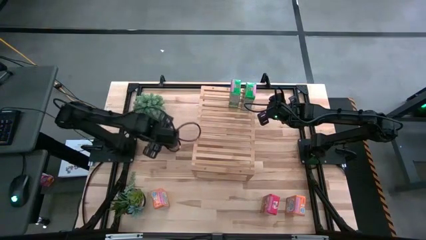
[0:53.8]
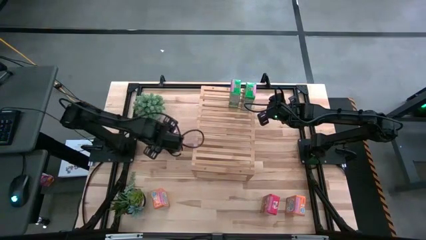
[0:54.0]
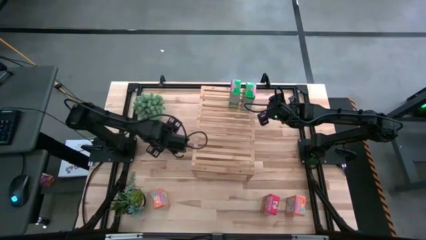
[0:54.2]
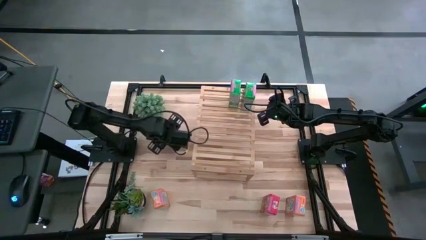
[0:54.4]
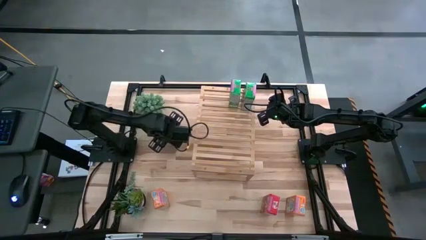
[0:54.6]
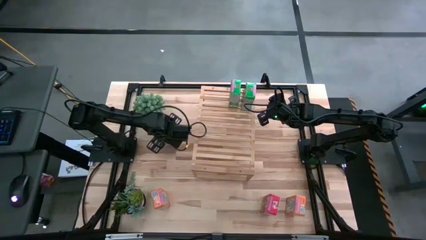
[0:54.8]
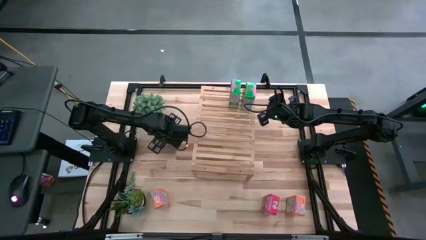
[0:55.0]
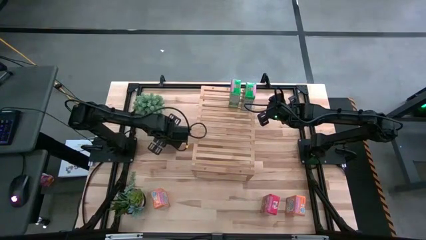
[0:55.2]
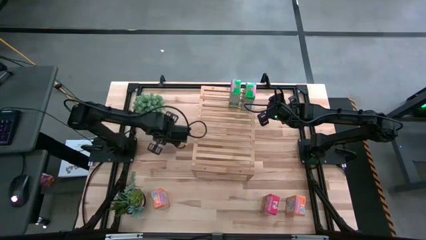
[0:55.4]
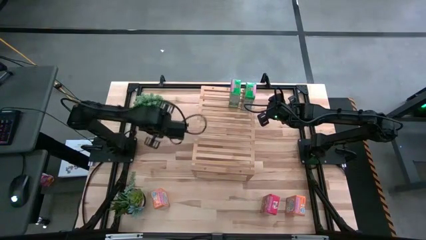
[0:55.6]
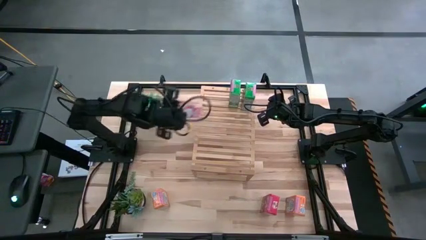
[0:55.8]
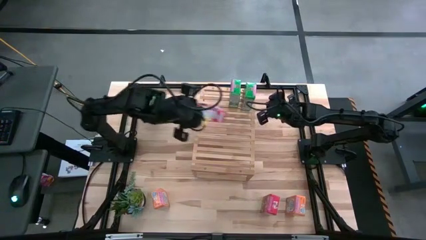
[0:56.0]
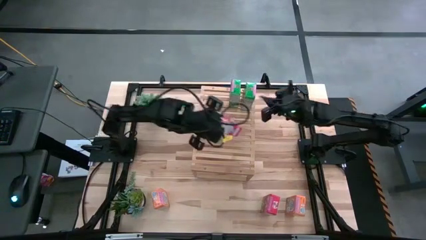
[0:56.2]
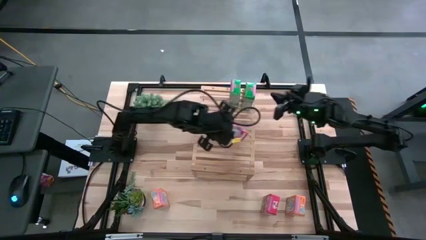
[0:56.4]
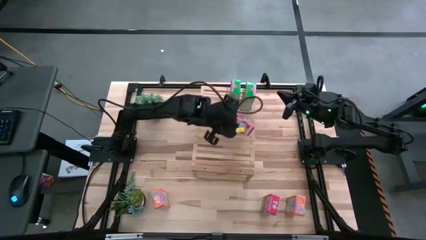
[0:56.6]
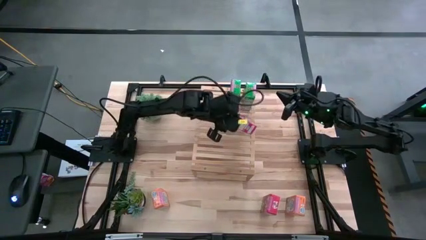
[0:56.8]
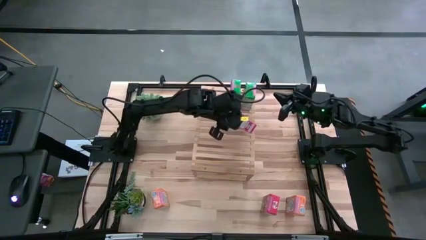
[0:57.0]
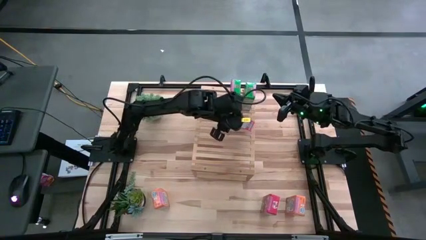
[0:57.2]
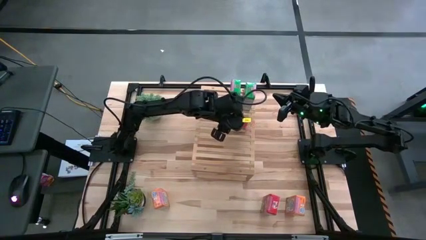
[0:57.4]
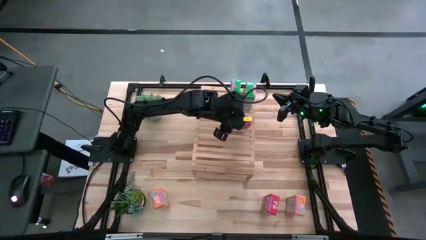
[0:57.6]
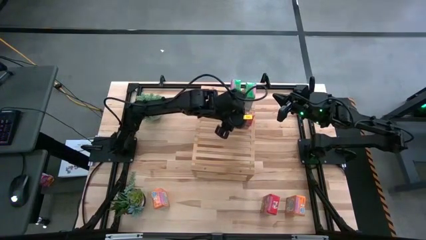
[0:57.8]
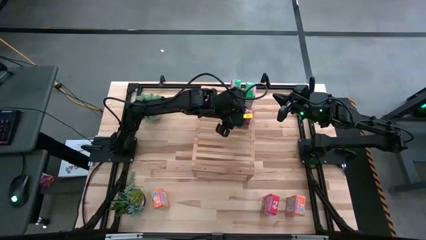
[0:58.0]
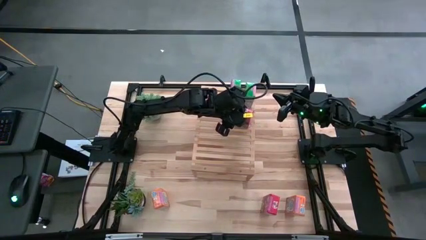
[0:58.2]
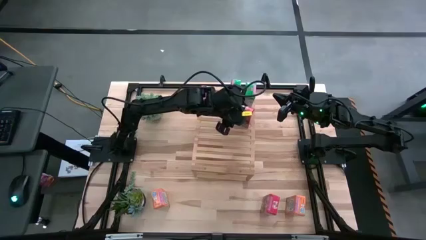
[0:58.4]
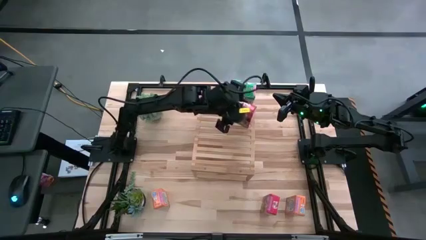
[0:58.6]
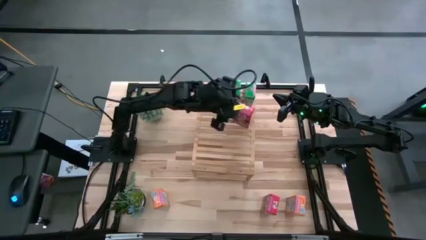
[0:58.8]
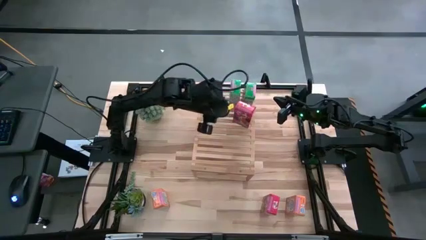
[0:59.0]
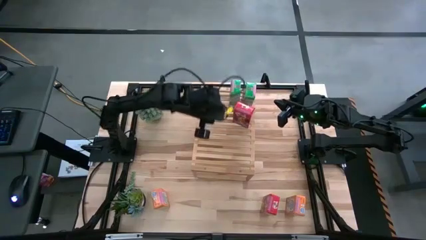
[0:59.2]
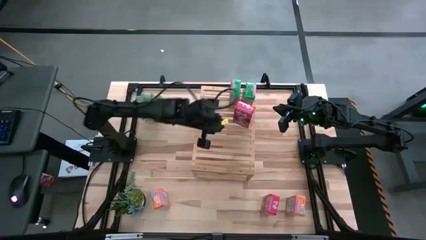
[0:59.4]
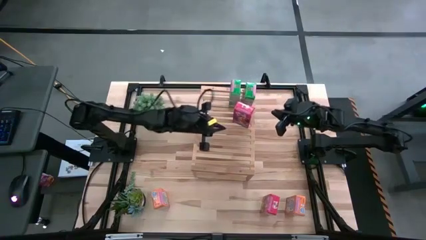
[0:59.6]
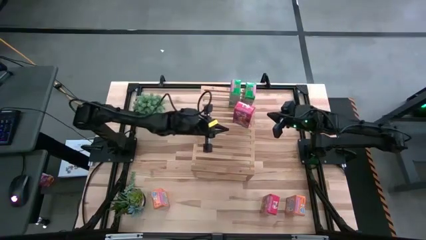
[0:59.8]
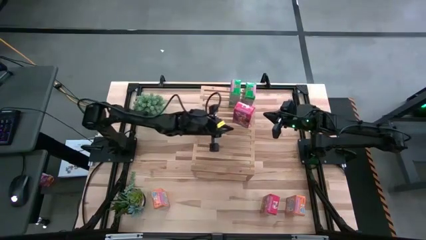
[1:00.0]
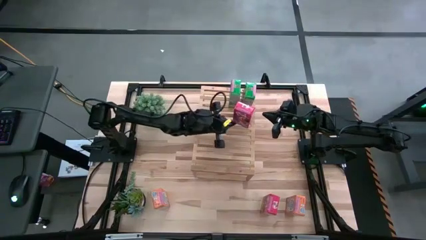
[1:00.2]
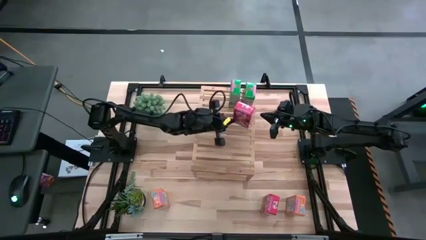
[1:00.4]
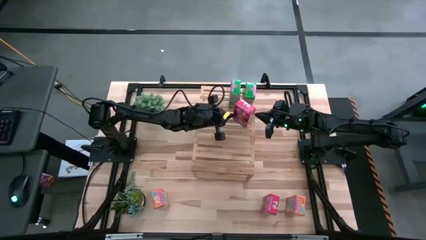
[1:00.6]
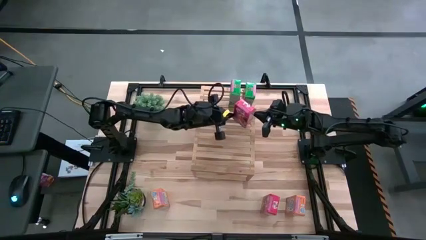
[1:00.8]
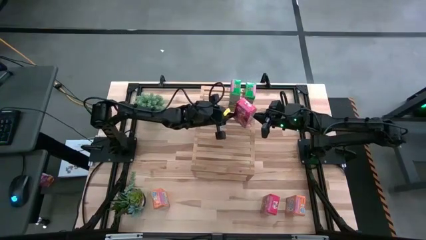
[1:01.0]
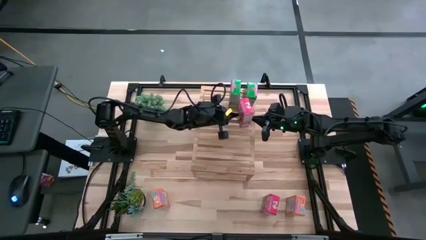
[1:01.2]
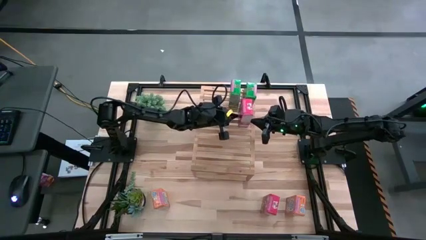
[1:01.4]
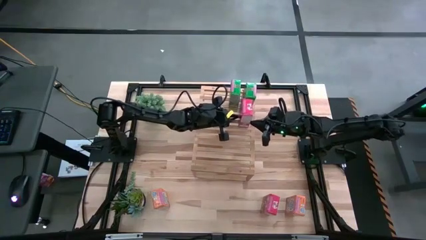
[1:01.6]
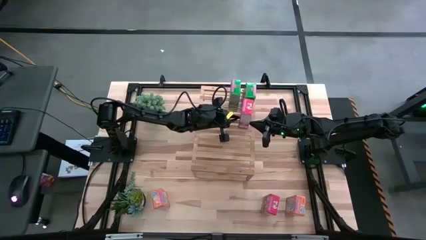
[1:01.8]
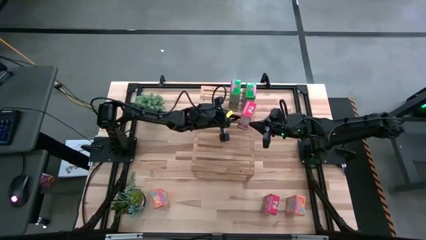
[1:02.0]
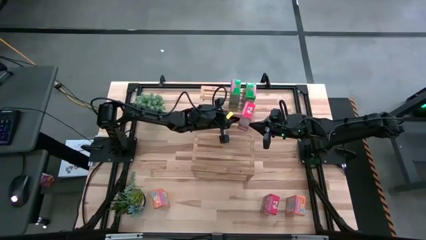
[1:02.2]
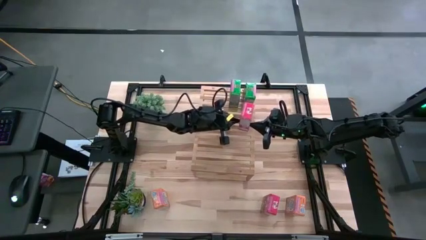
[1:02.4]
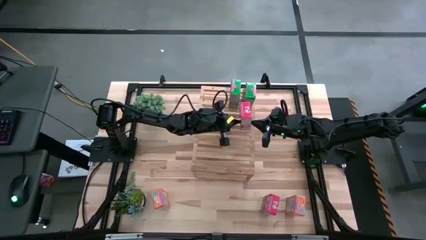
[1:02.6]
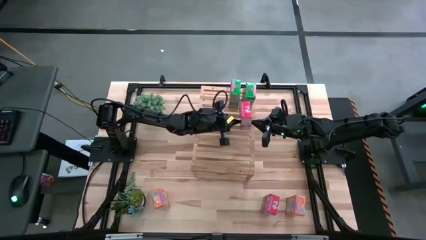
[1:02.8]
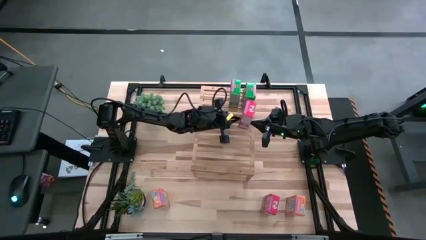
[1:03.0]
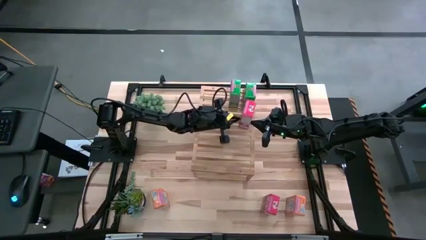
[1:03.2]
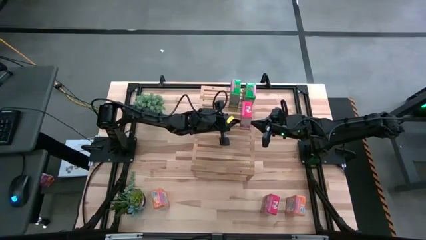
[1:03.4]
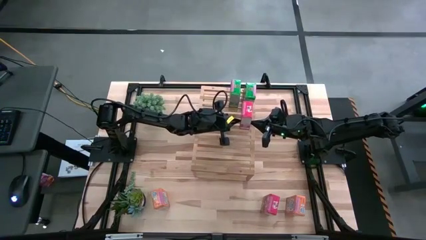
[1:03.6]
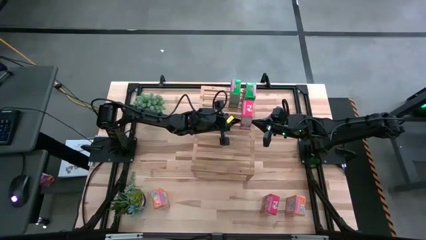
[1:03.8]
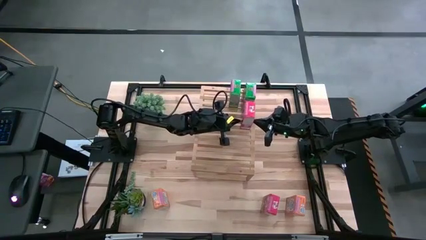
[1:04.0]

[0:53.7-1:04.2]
Task: Stack cereal on shelf
Put the left red box cereal on the shelf

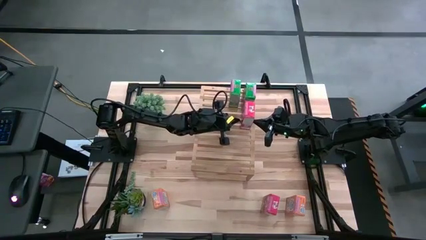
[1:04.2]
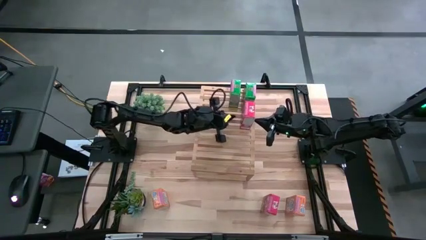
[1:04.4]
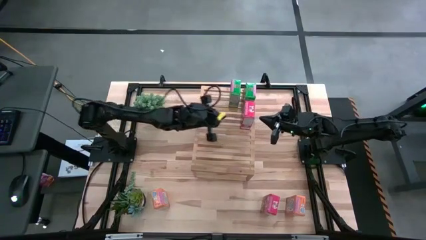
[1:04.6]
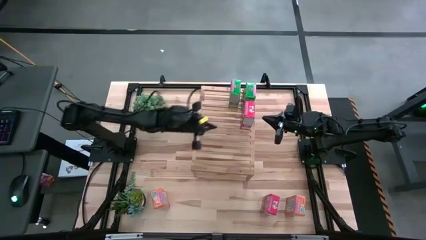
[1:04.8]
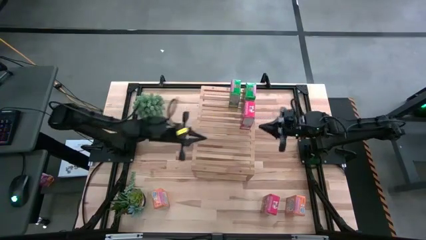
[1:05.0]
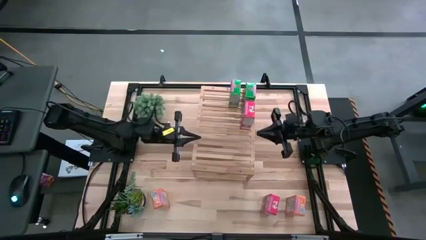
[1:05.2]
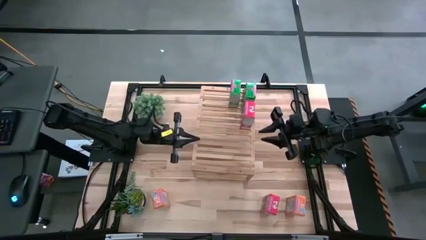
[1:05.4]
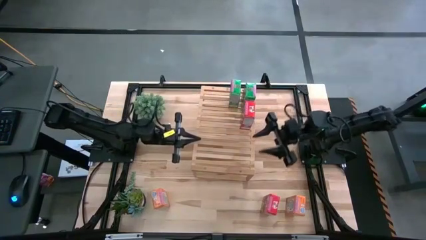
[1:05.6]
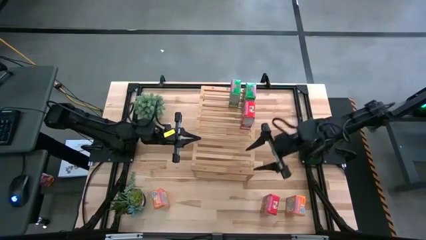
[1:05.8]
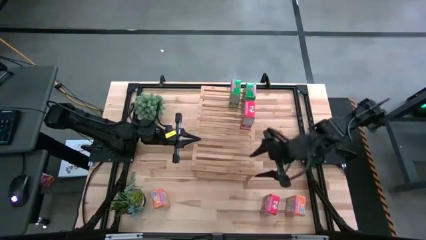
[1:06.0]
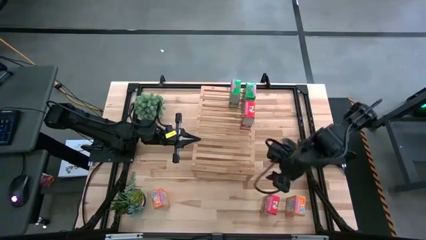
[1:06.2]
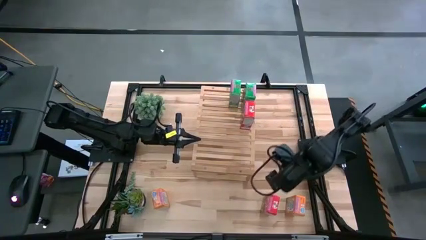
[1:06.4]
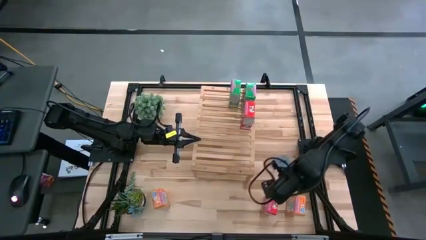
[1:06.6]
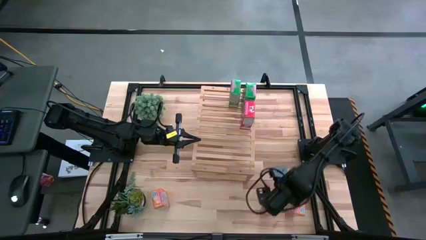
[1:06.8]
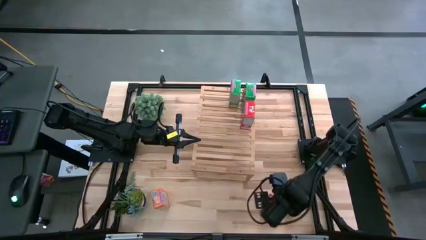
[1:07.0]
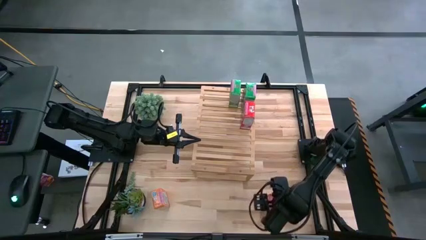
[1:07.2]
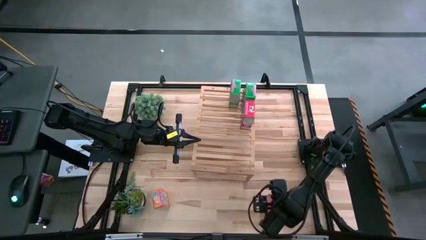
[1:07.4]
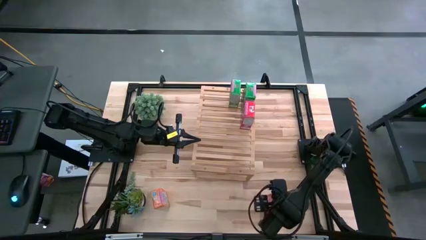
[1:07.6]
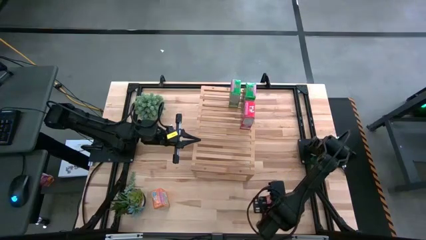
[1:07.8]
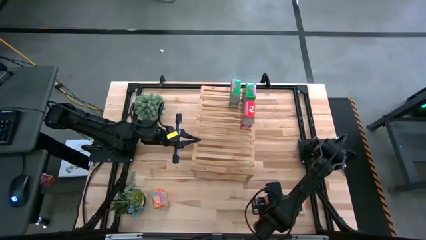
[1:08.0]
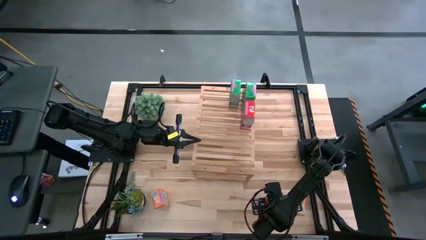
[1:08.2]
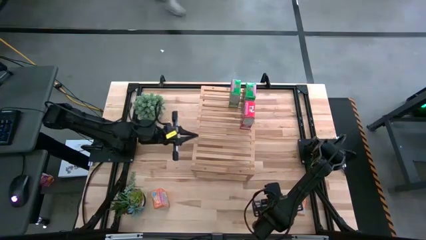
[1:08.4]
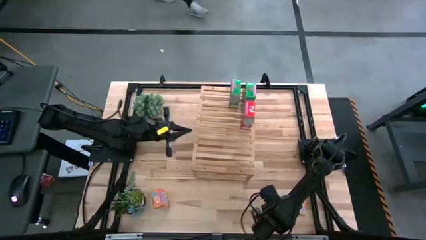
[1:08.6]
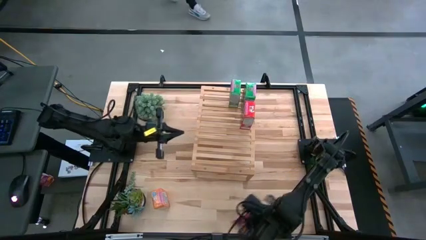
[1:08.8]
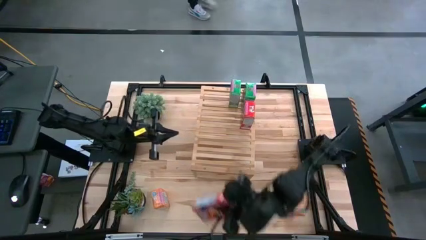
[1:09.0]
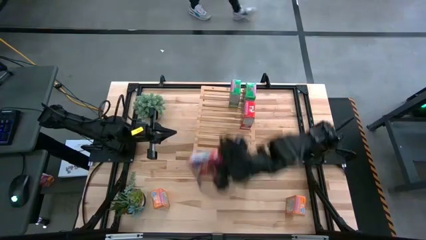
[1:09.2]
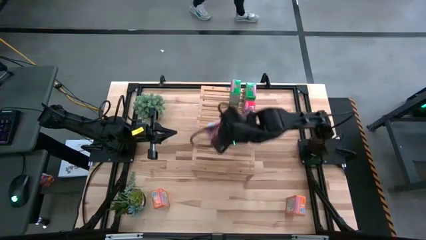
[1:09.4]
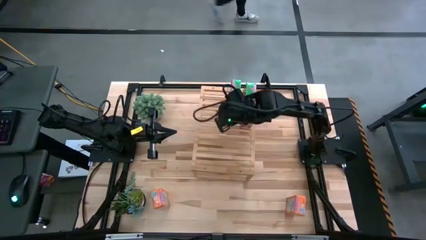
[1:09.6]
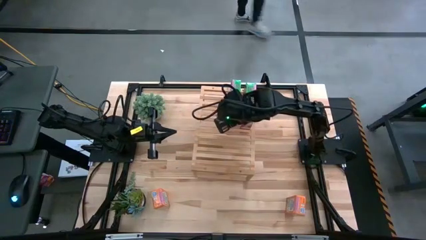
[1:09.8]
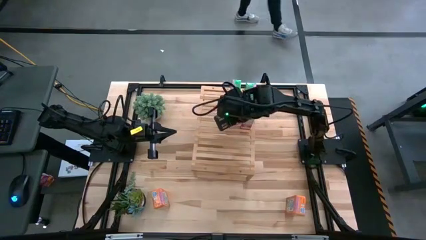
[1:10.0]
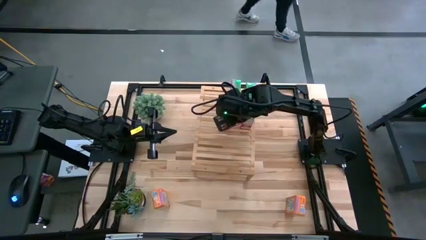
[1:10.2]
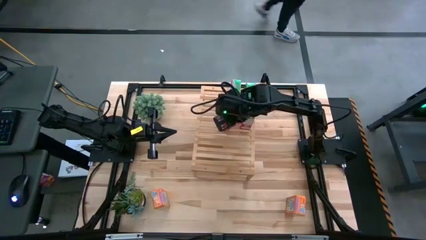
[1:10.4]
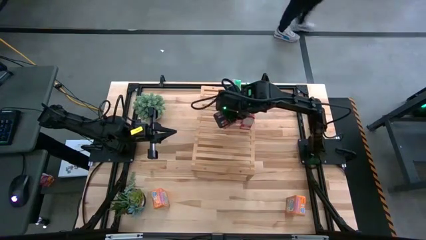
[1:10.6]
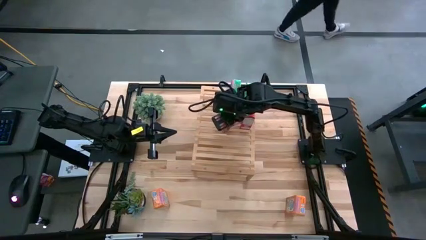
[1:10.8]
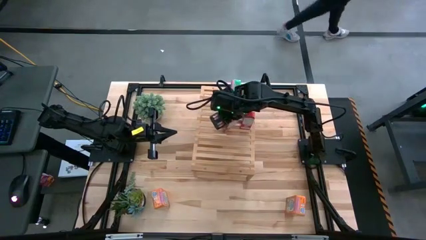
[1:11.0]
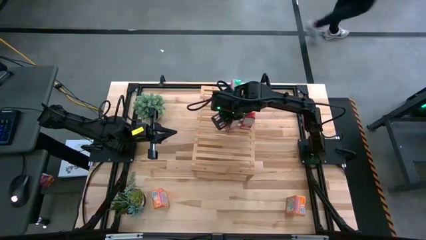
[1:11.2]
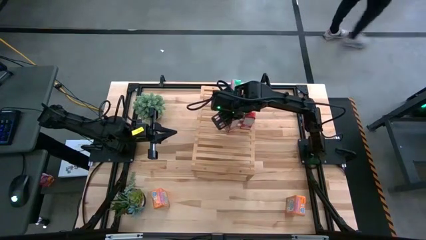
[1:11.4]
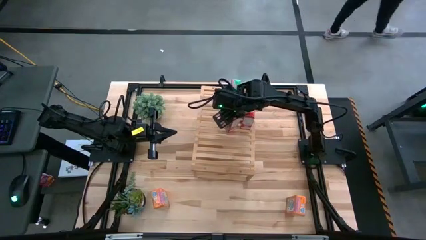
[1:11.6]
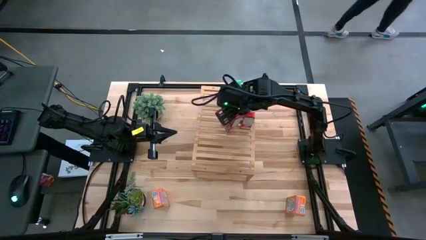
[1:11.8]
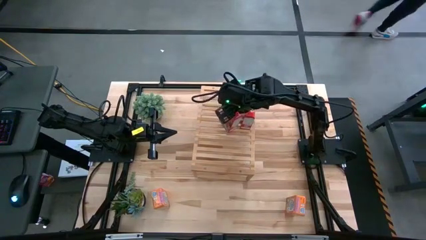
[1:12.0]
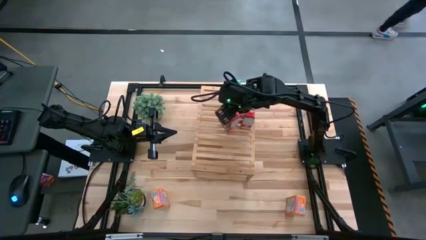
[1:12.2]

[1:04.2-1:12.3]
Put the red cereal box on the shelf aligned with the other red cereal box
